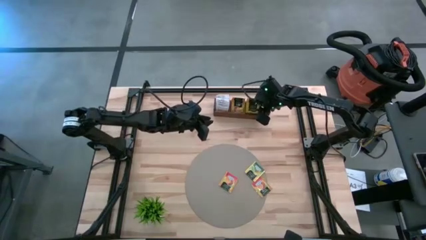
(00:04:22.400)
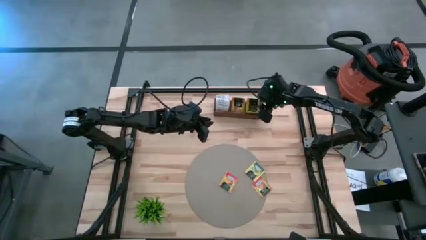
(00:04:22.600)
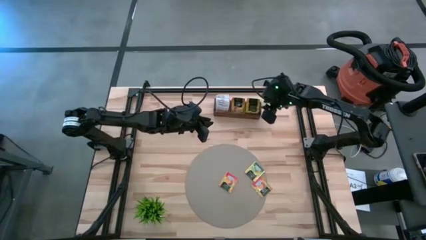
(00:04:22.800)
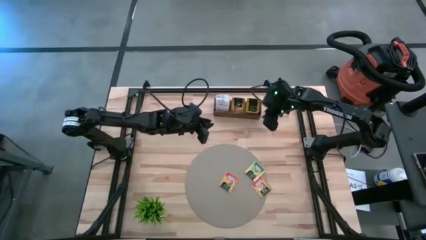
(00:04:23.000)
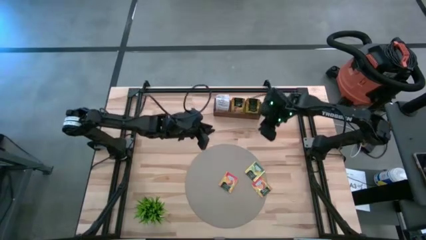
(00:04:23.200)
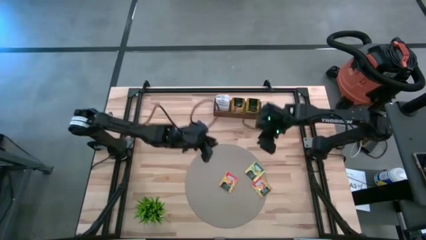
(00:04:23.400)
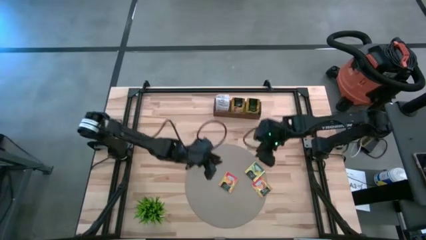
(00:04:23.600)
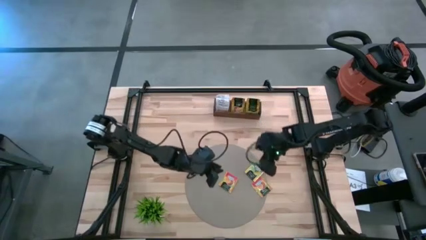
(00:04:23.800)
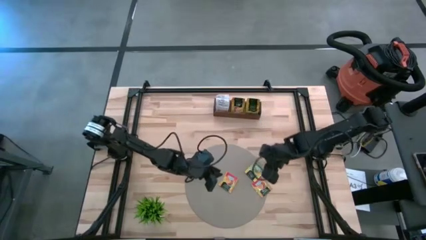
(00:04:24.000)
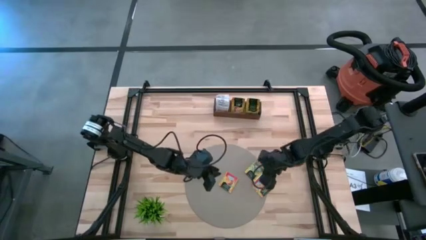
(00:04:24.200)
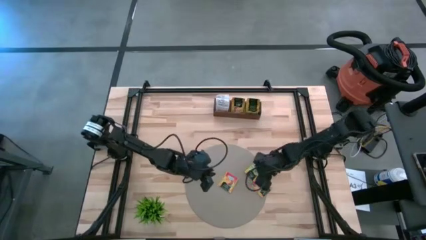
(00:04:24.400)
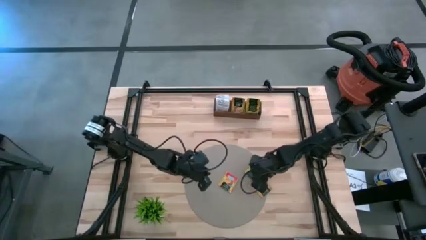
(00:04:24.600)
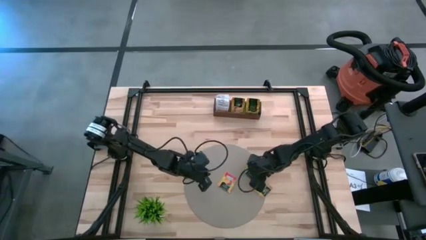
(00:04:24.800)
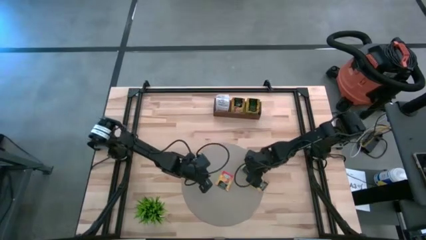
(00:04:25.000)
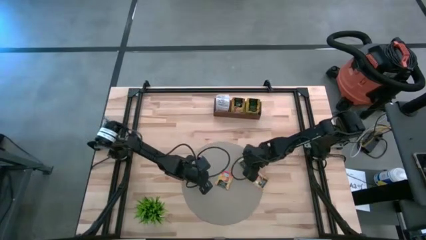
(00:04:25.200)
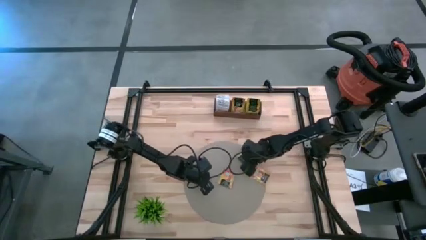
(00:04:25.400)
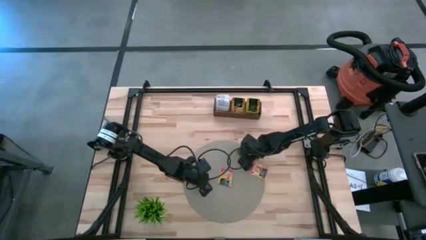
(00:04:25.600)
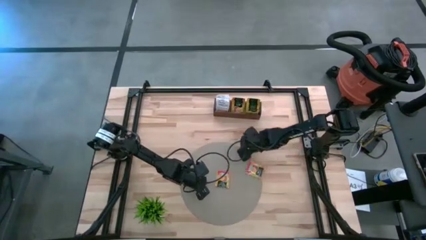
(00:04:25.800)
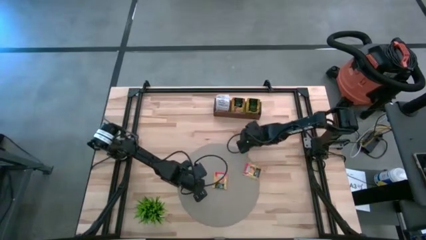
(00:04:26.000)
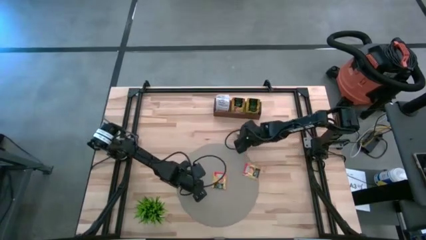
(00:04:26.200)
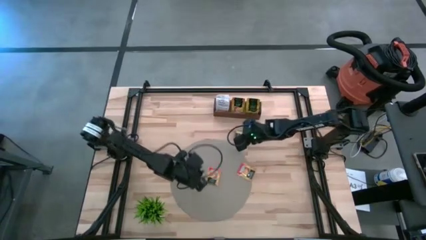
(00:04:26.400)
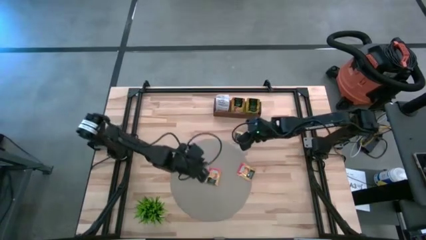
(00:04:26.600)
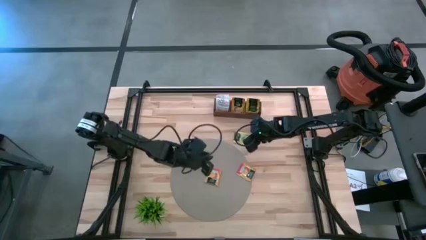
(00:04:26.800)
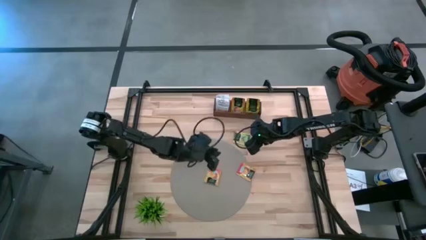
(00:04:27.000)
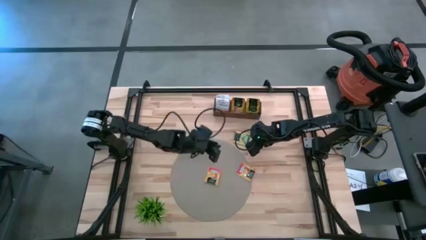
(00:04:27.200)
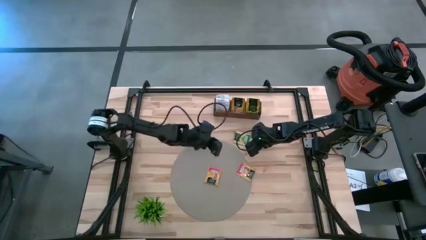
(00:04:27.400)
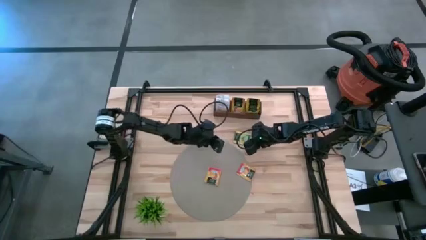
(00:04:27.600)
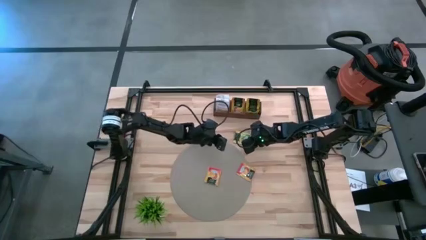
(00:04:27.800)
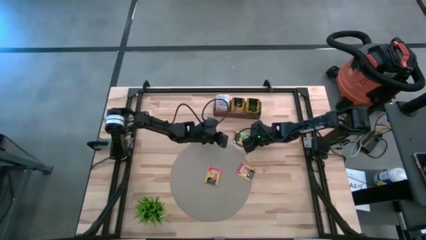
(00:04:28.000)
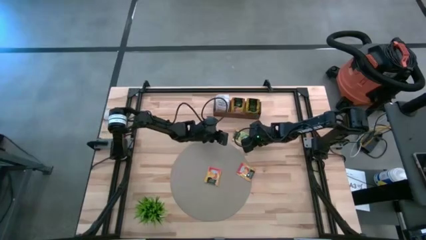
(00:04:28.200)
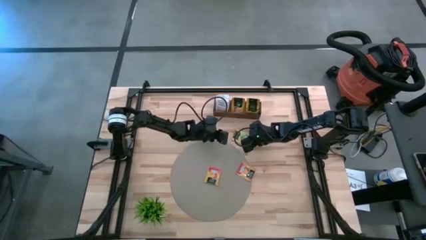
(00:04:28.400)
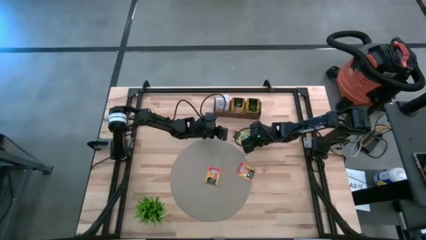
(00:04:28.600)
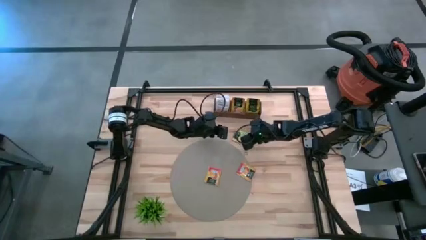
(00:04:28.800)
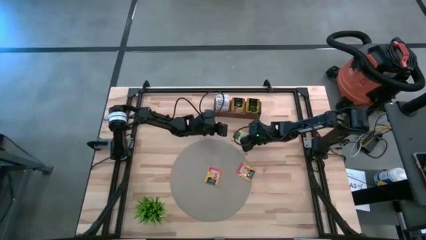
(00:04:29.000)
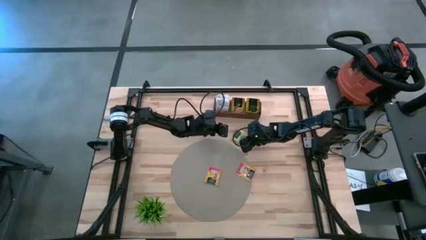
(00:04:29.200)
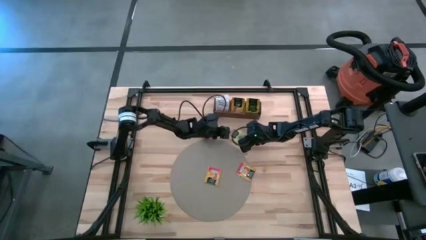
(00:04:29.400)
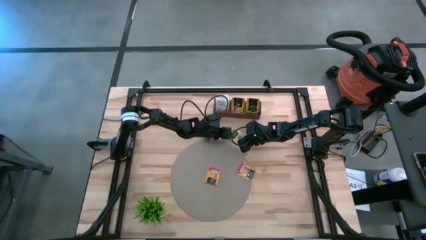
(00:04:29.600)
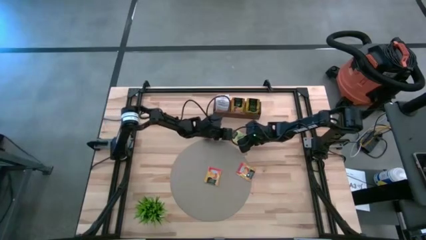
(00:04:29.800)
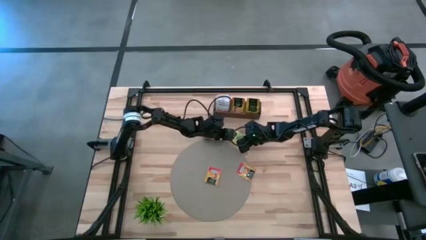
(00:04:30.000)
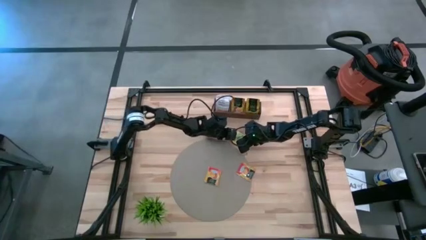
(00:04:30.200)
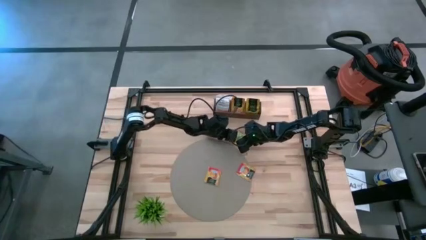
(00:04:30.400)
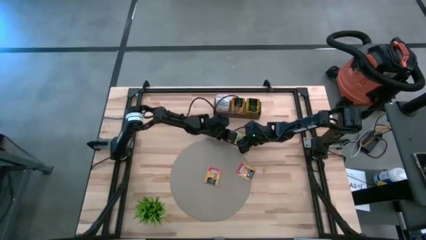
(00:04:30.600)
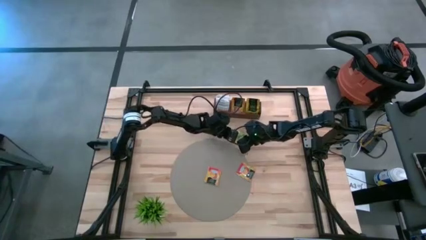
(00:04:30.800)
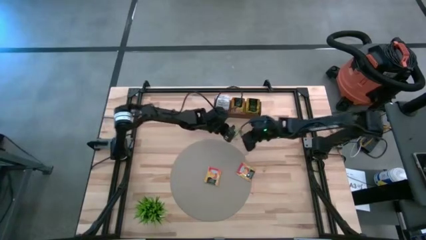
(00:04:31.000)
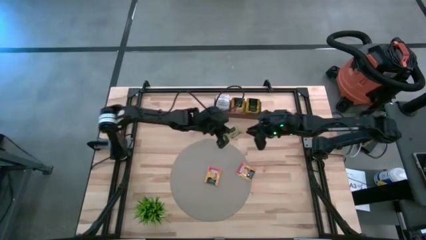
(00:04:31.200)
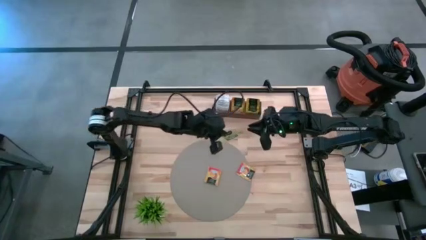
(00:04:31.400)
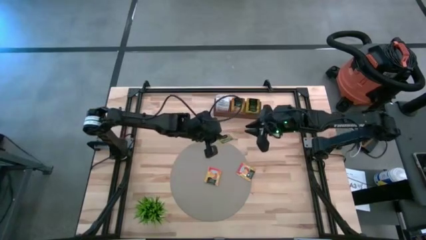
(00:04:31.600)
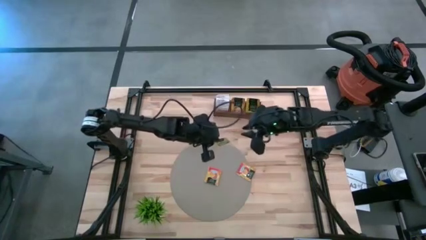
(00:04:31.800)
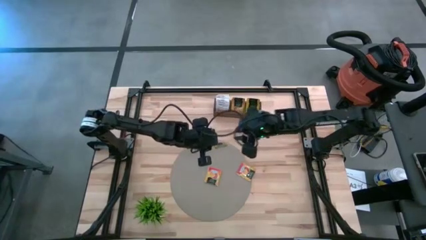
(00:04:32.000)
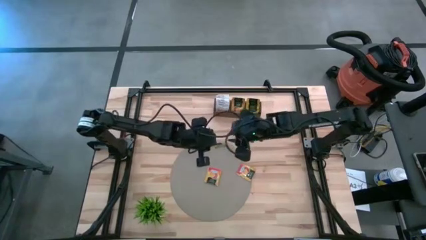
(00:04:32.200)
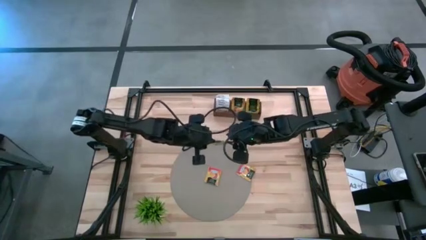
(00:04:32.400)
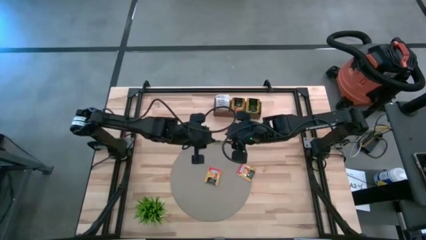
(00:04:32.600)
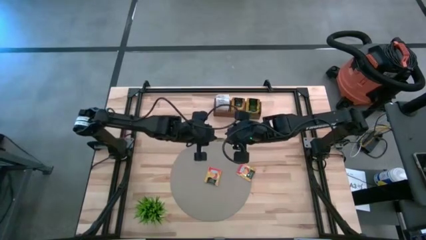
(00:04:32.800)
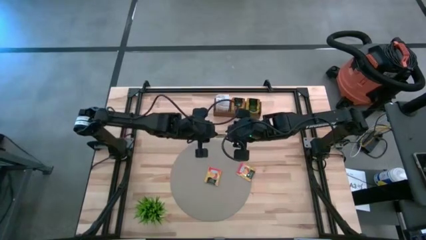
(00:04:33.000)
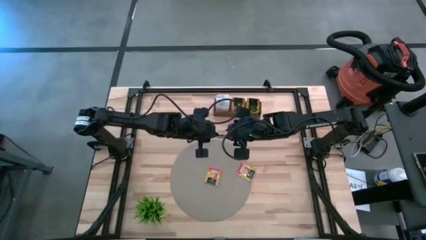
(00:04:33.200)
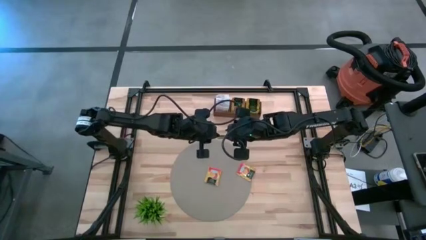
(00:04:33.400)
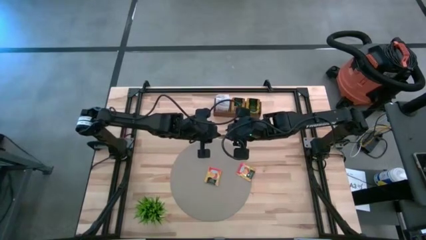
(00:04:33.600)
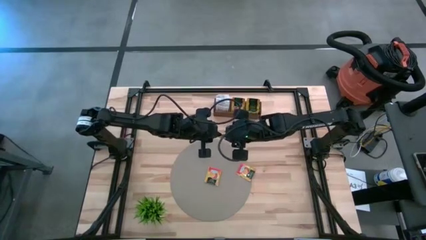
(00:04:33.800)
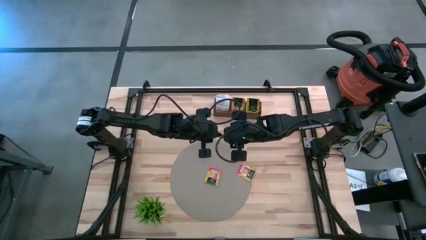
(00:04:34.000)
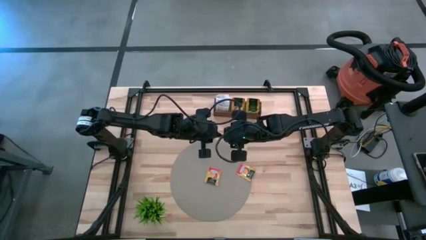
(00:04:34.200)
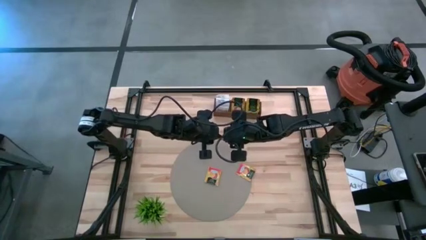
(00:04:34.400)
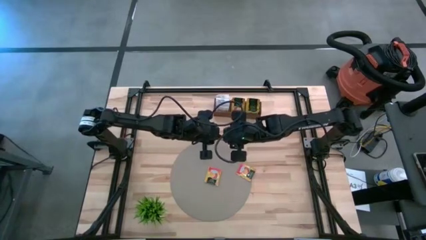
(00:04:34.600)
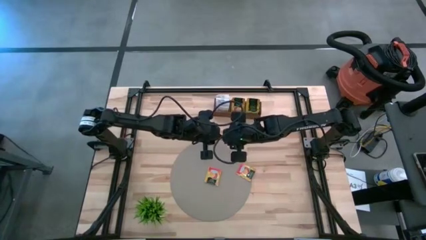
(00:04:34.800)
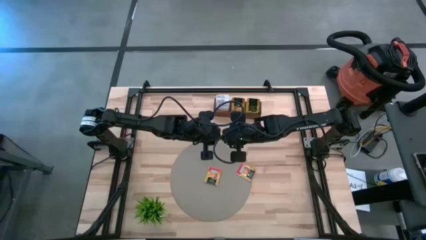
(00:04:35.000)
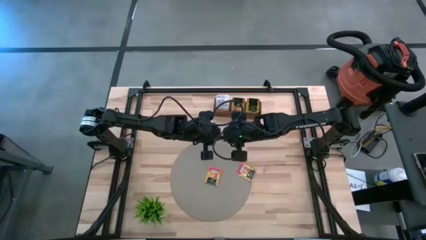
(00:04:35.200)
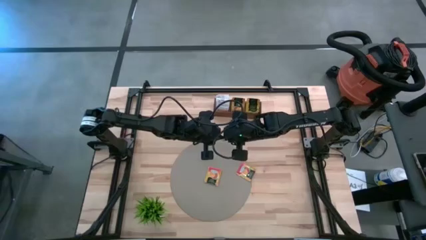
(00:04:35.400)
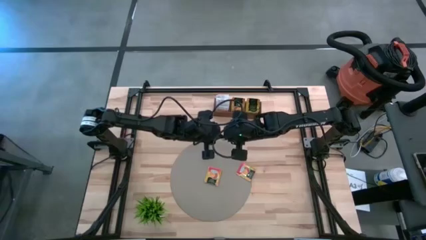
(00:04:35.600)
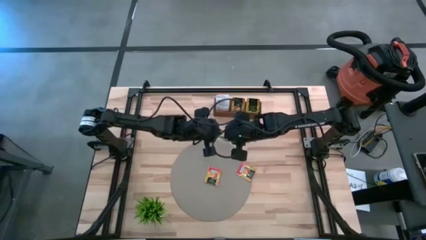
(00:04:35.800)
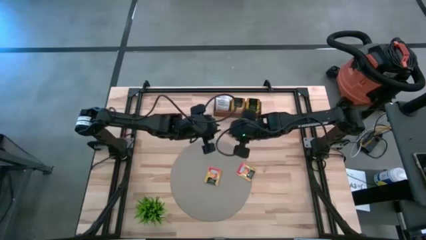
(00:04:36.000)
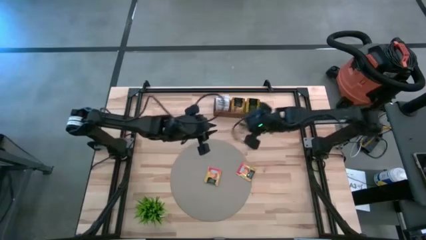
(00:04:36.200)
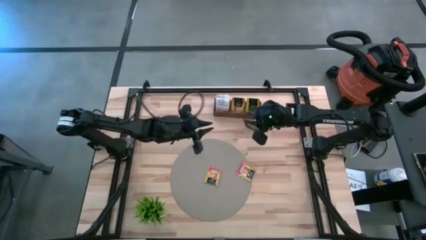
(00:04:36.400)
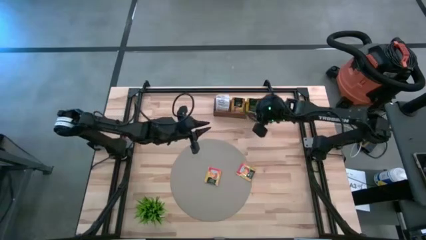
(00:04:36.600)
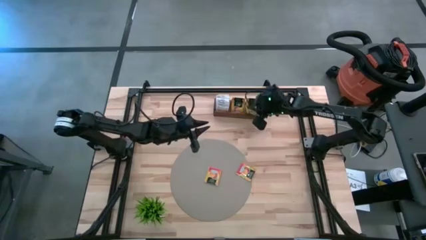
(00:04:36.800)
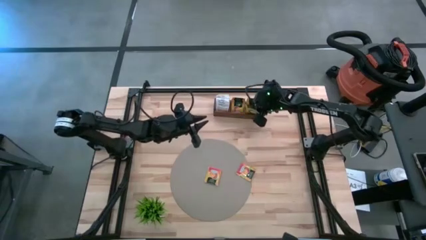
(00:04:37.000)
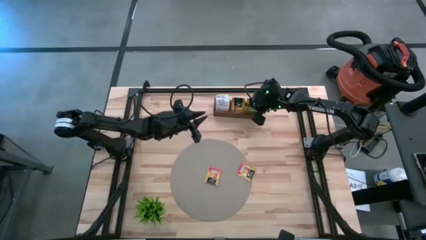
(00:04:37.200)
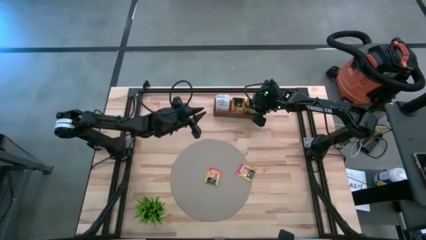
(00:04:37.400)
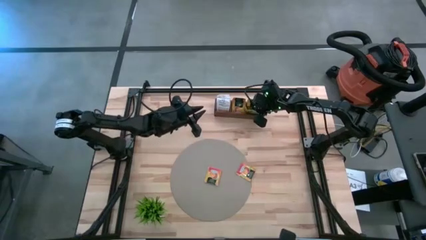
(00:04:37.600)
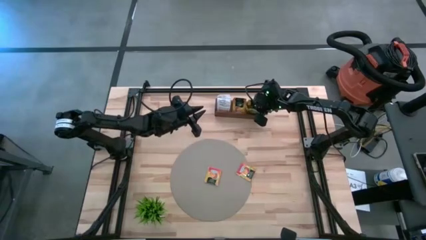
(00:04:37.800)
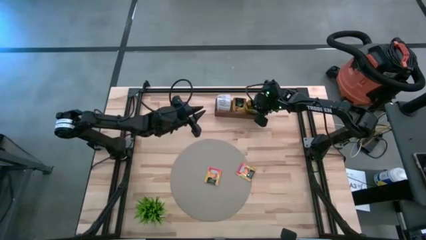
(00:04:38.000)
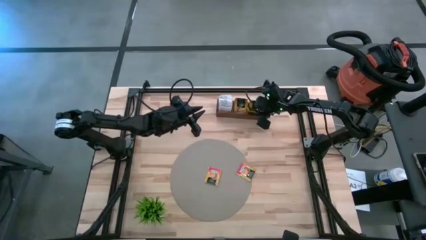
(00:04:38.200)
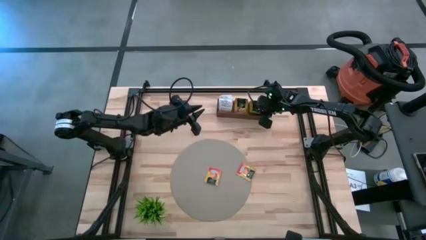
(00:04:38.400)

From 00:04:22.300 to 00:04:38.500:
Task: Pick & Place Tea
Put the yellow tea bag into the right section of the wooden organizer
